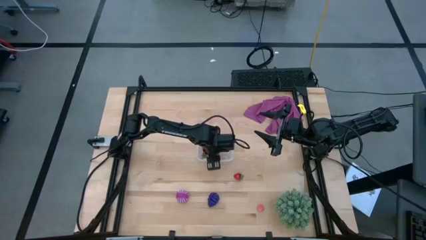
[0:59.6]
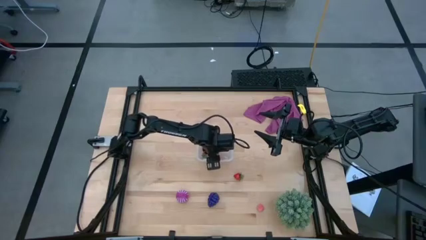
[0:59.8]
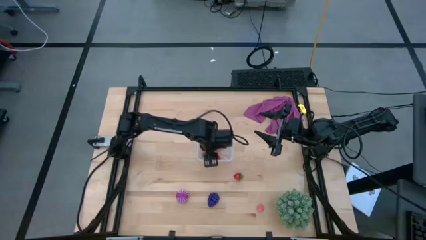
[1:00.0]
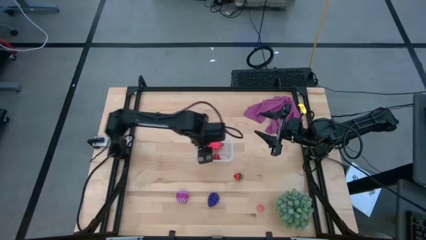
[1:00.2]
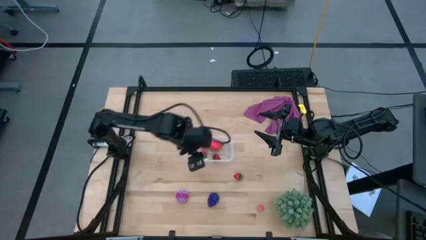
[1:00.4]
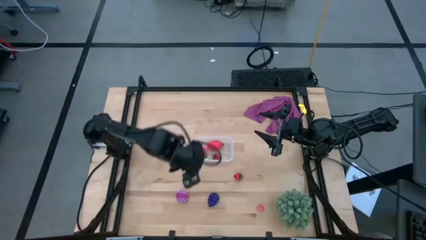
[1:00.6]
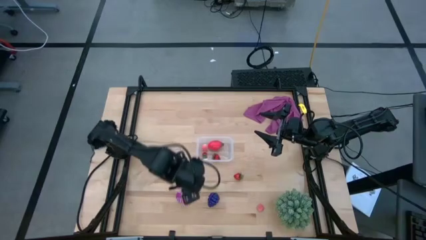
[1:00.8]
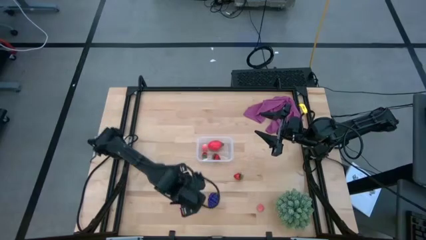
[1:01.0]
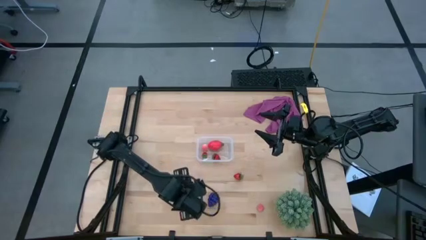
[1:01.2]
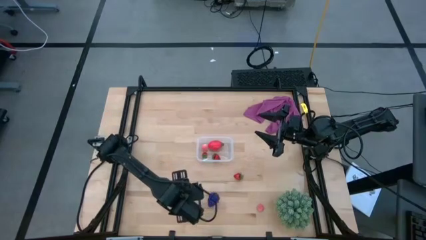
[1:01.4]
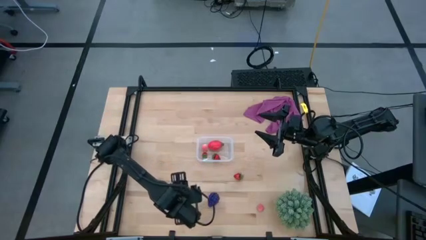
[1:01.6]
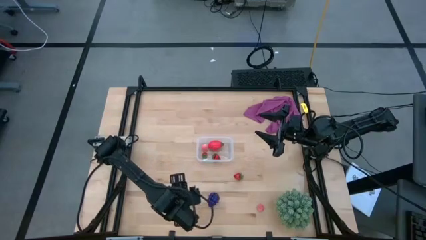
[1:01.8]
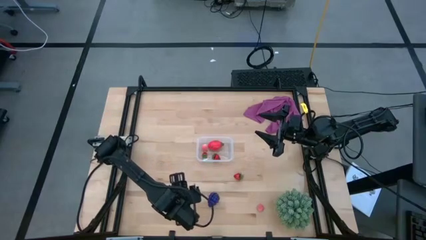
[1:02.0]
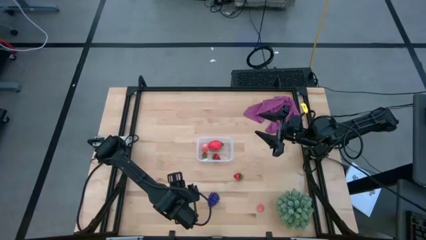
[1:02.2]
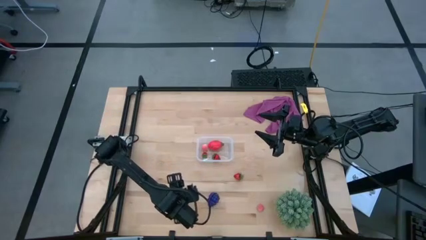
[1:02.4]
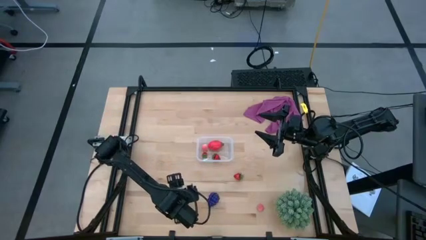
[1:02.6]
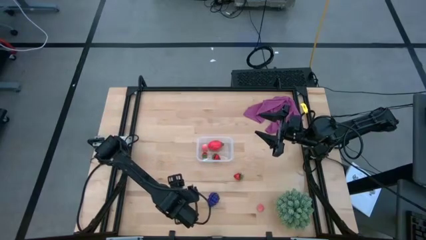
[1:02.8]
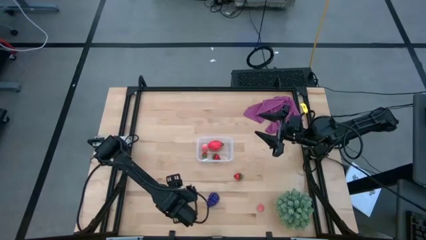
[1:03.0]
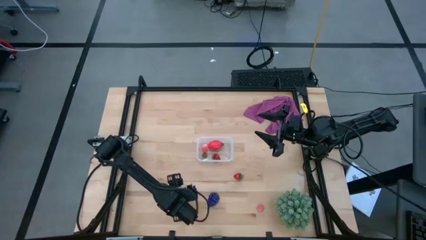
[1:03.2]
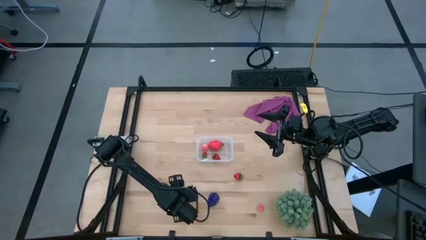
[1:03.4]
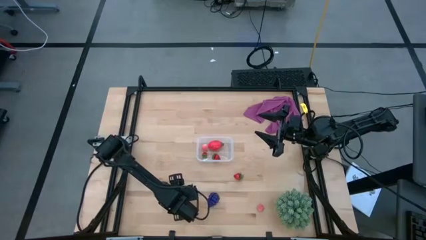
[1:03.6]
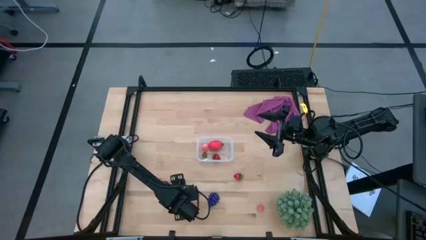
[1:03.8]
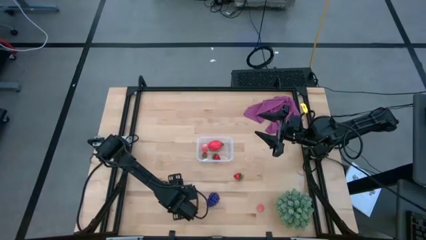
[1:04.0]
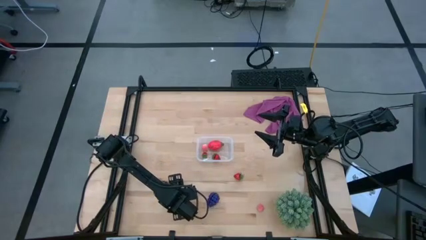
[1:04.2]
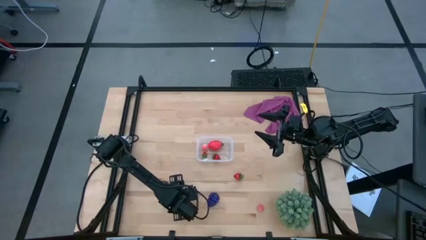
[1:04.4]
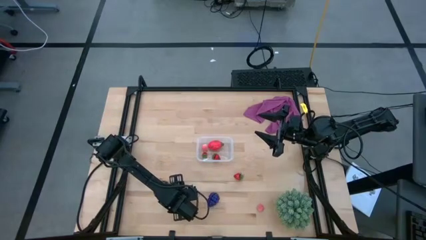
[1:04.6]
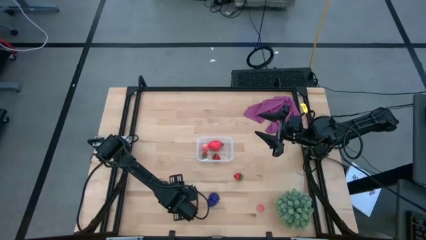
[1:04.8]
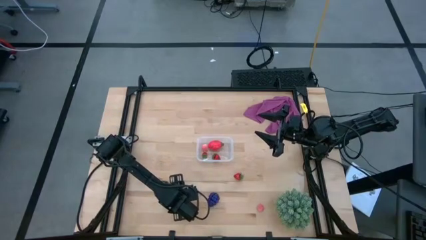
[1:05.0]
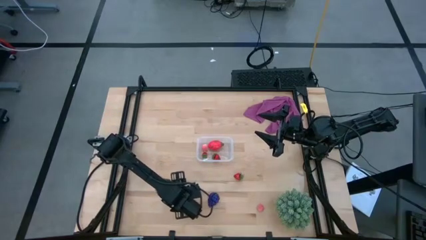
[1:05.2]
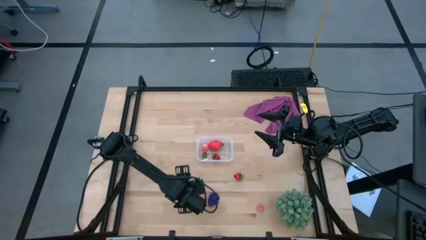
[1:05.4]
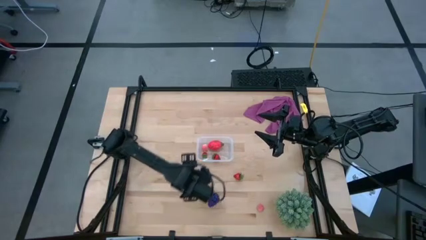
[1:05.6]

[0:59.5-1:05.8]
Task: Pick and placing Produce into tupperware
Put the violet onion into the transparent container

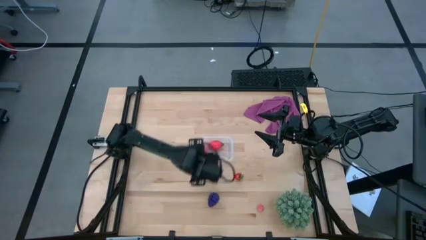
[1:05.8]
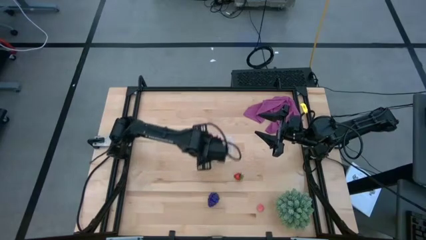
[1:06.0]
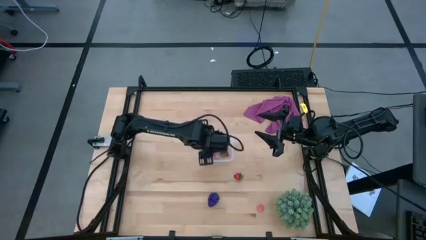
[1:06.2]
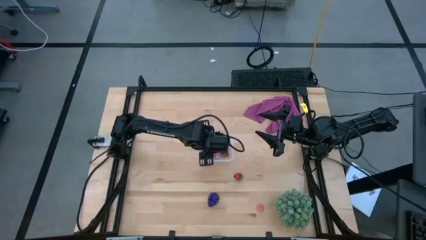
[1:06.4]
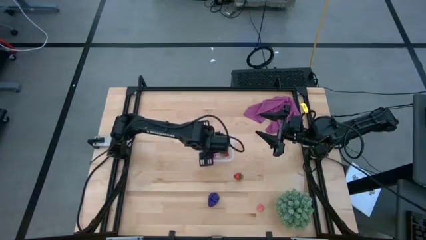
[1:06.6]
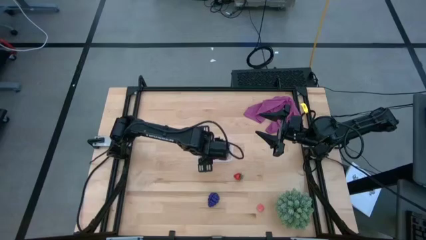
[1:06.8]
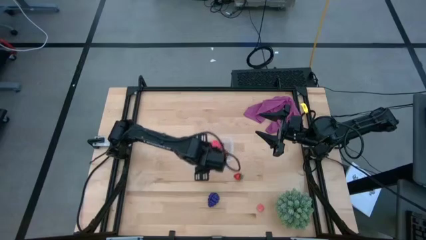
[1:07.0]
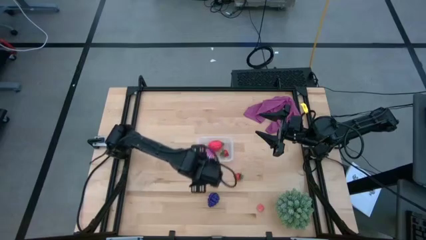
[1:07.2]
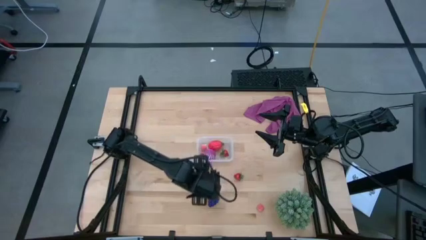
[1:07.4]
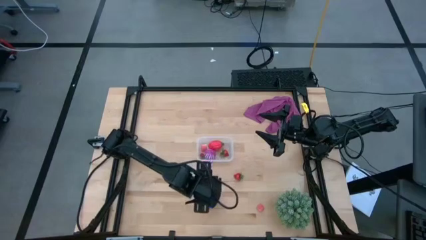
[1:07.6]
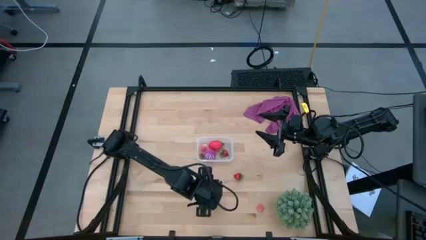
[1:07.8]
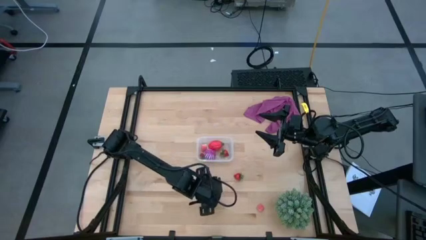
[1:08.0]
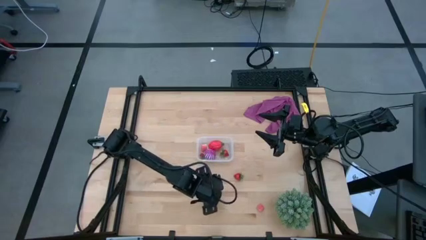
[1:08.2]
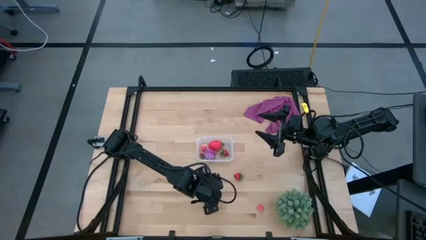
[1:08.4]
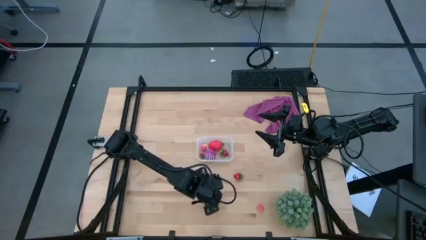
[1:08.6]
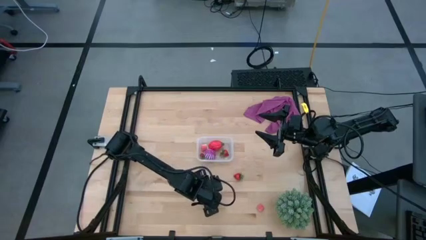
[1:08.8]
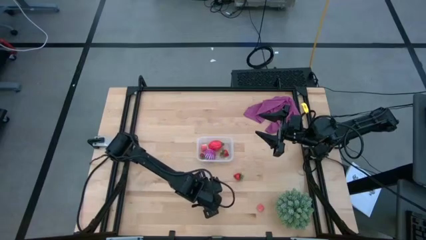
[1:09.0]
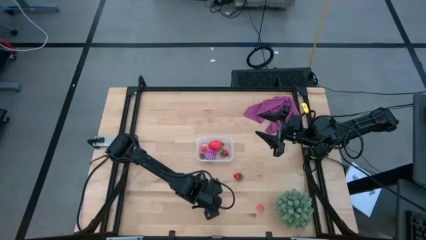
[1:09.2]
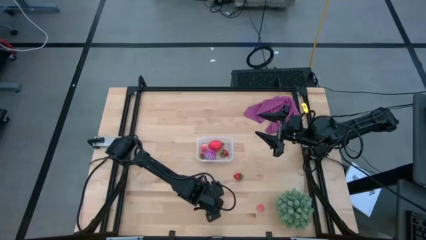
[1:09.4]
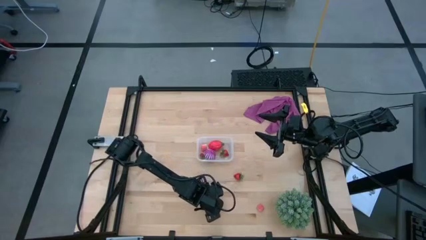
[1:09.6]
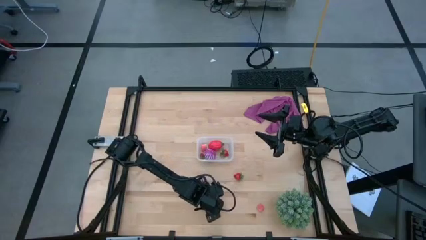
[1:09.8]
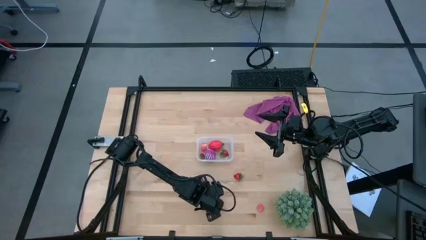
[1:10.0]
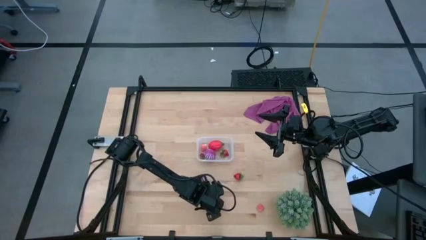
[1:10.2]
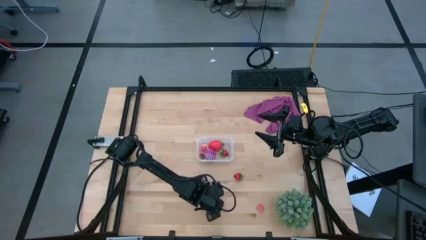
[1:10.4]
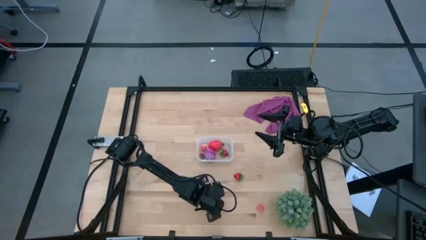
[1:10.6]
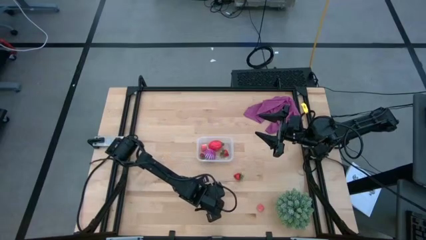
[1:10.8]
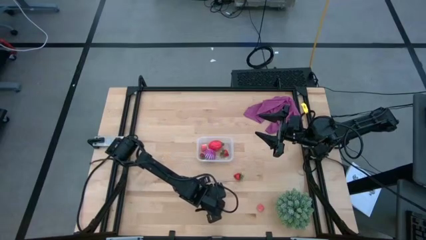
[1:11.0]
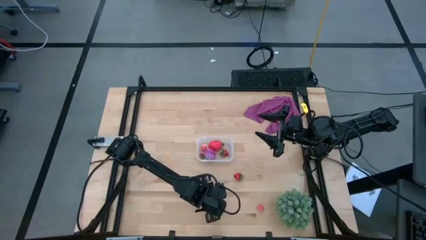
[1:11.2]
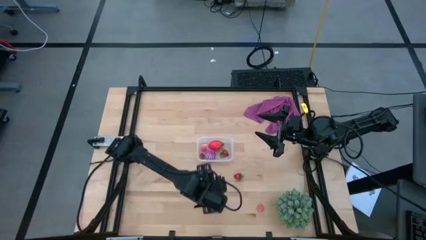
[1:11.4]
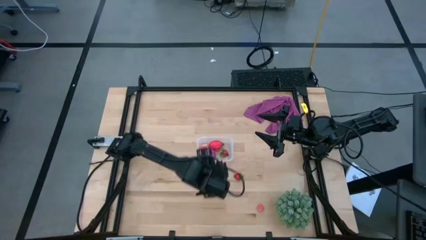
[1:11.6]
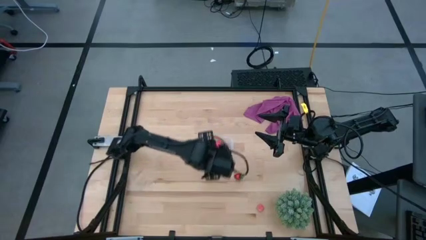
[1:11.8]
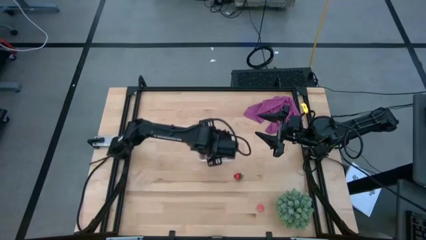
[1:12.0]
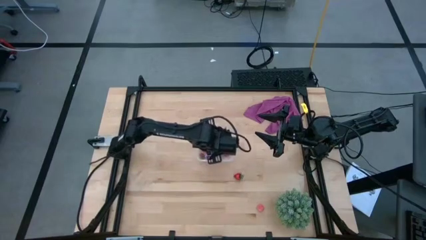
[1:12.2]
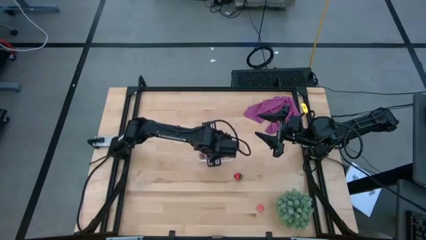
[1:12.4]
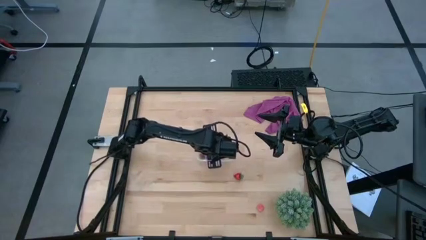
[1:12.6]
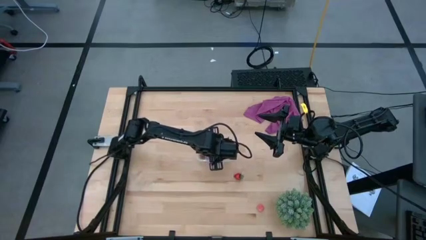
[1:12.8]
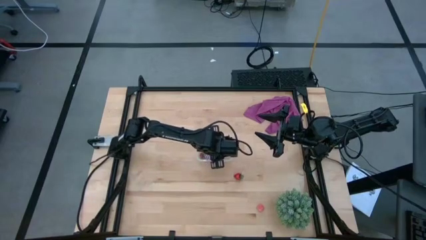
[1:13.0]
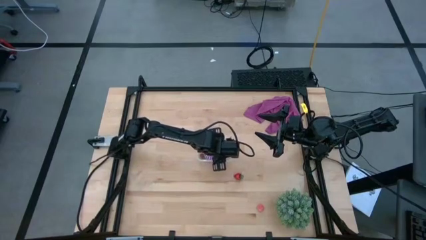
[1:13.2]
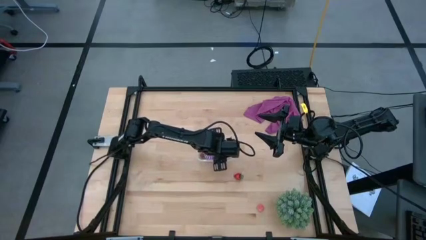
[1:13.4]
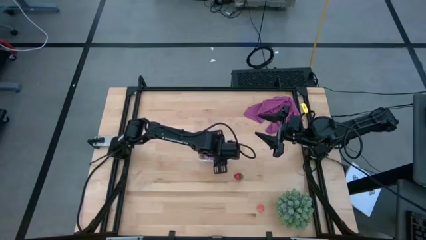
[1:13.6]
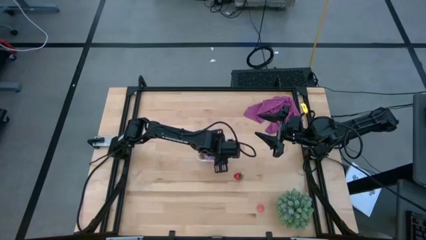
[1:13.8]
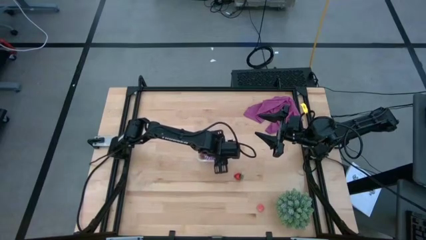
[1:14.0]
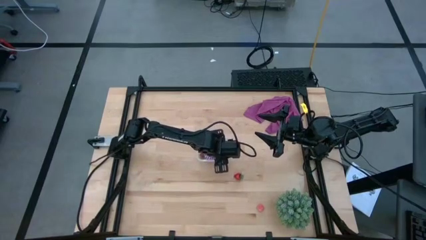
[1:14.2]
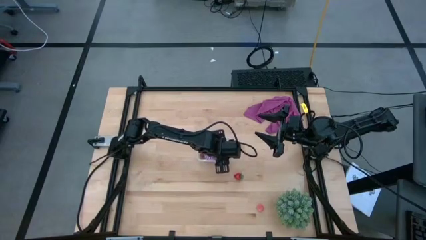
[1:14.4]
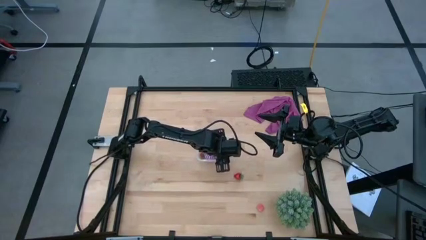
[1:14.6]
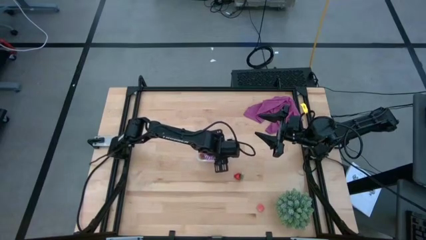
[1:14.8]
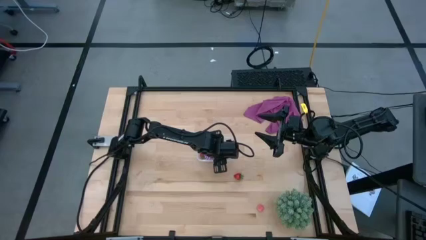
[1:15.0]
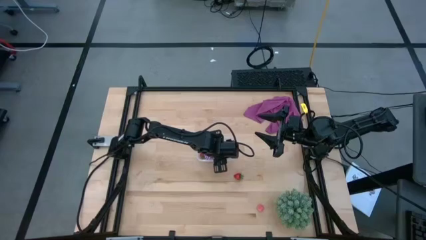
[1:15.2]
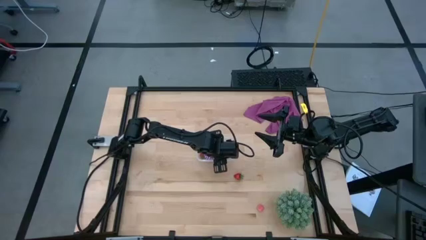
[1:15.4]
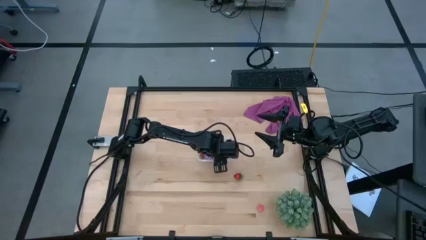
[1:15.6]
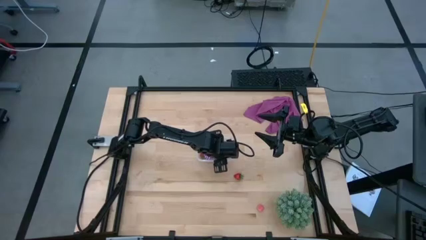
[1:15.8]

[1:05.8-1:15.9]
Put the violet grape fruit into the transparent container
